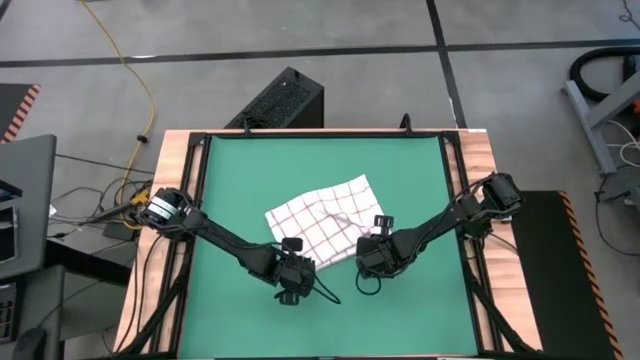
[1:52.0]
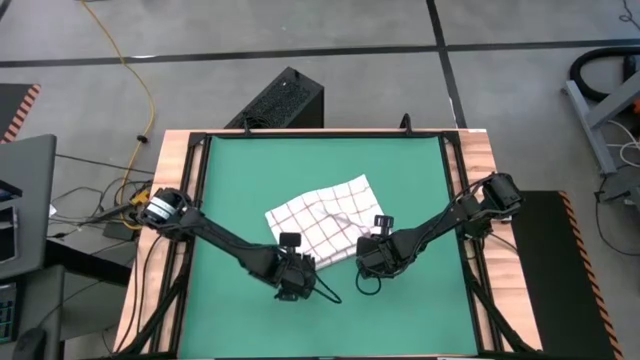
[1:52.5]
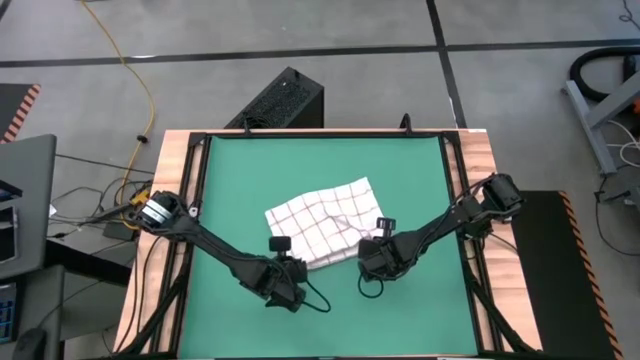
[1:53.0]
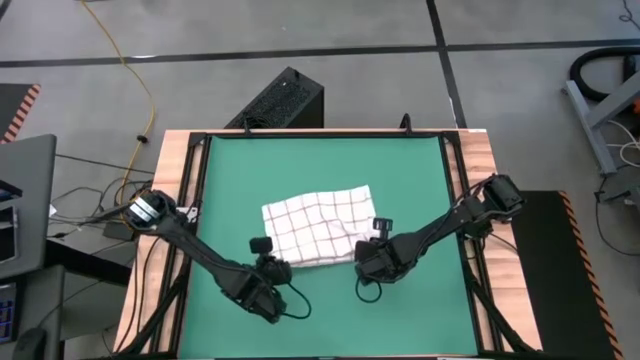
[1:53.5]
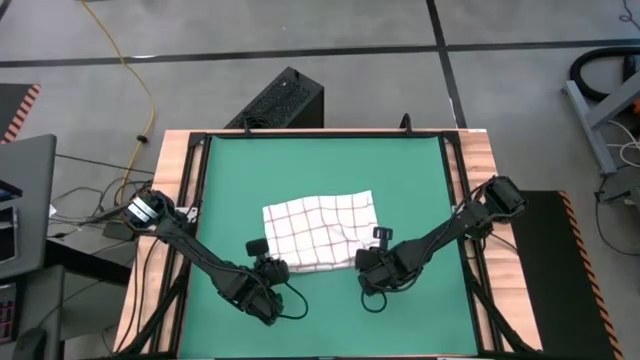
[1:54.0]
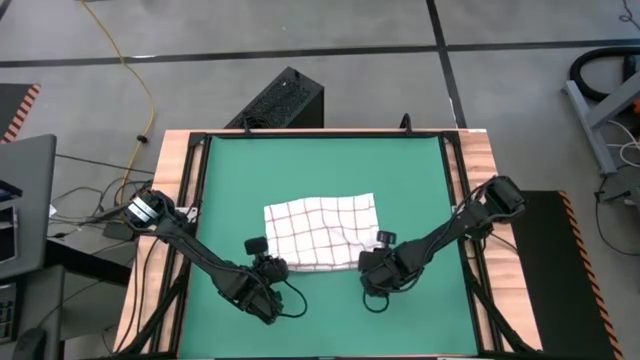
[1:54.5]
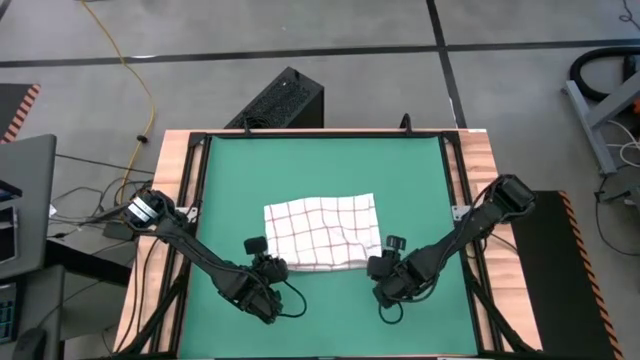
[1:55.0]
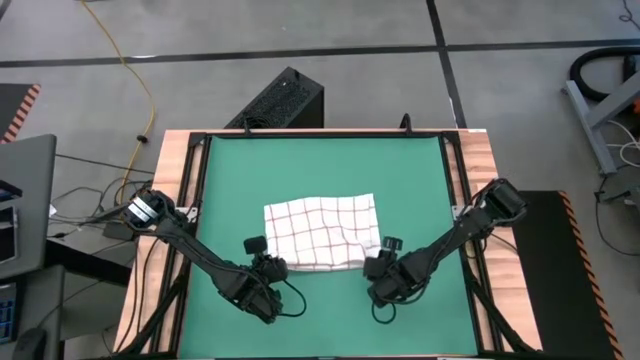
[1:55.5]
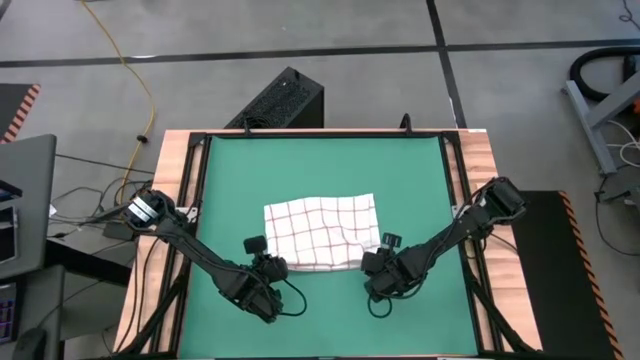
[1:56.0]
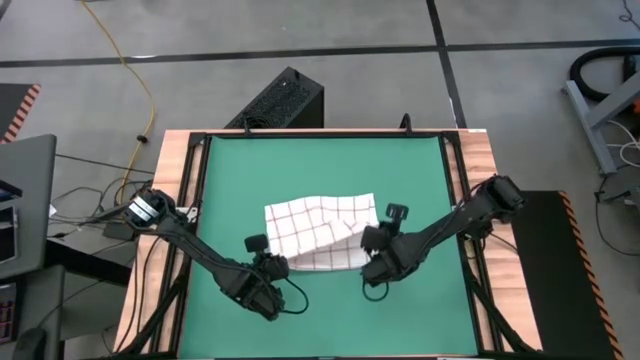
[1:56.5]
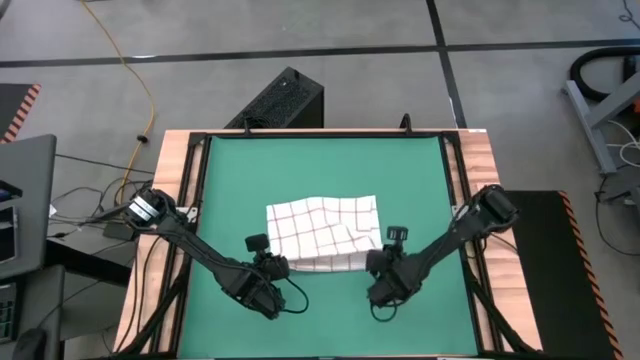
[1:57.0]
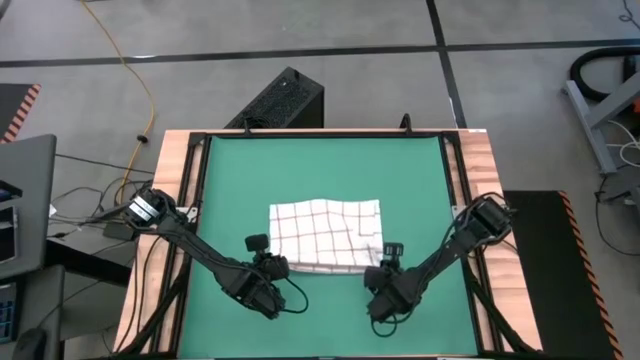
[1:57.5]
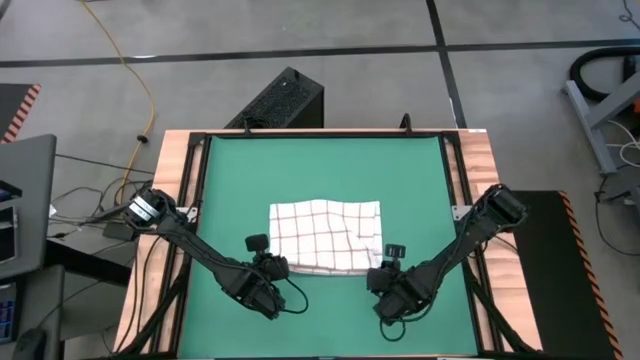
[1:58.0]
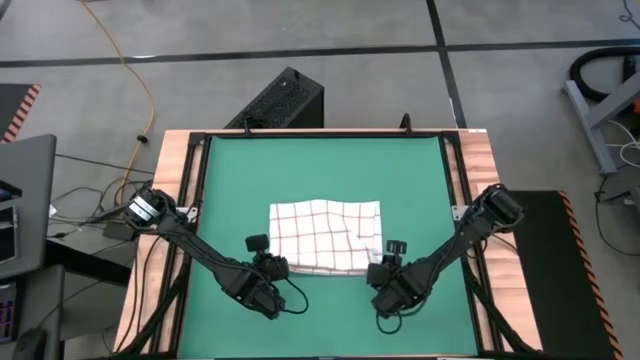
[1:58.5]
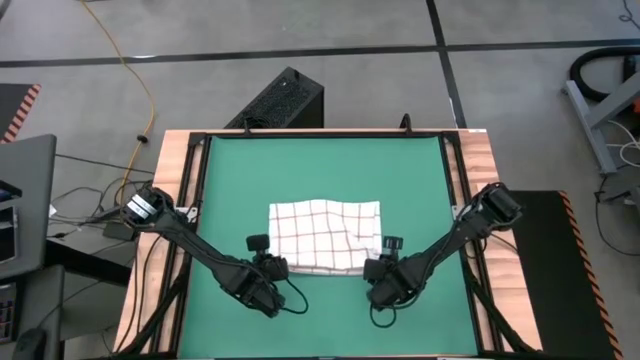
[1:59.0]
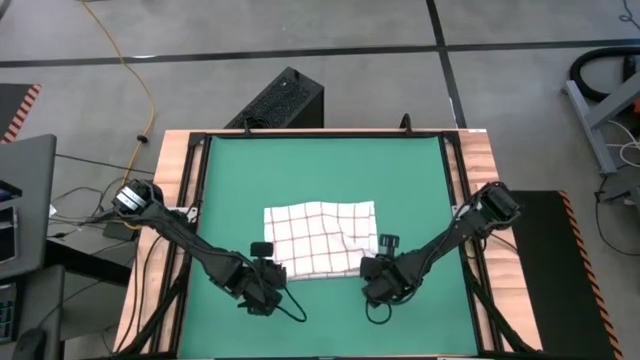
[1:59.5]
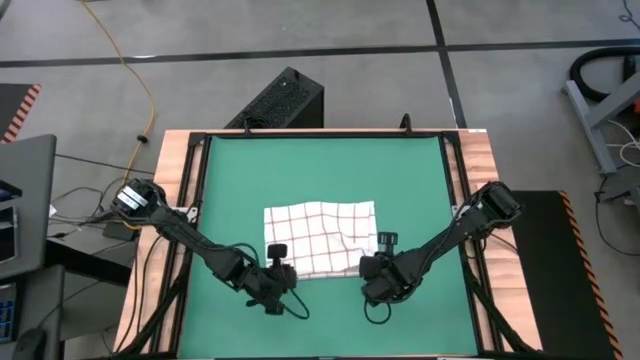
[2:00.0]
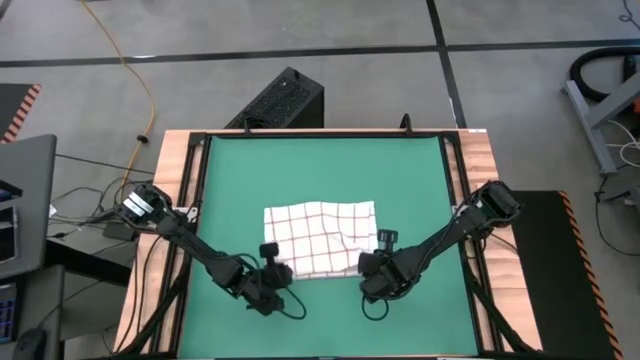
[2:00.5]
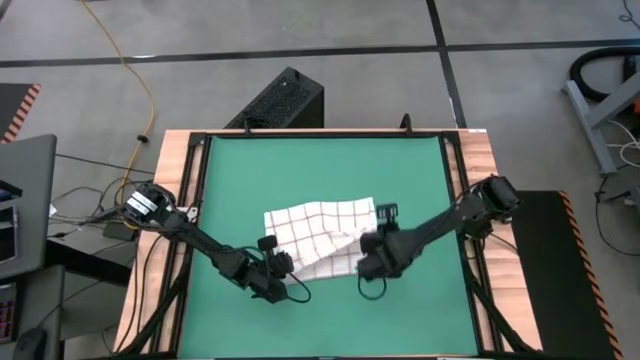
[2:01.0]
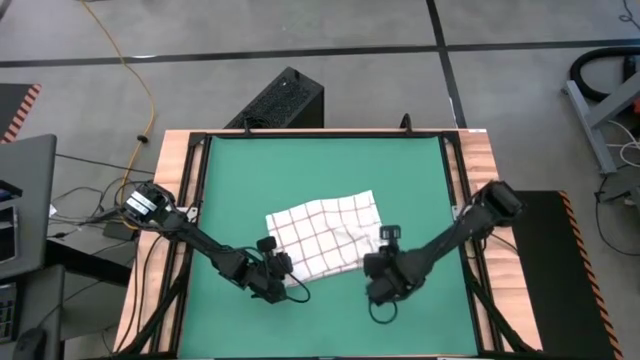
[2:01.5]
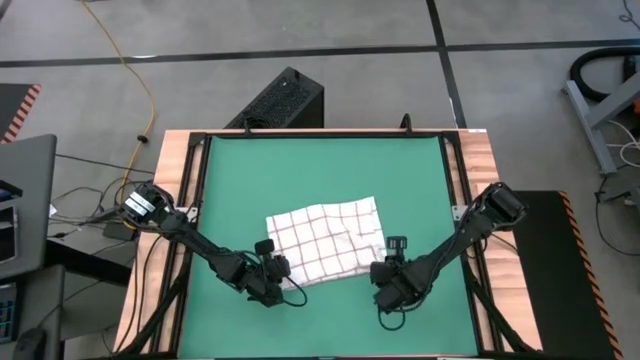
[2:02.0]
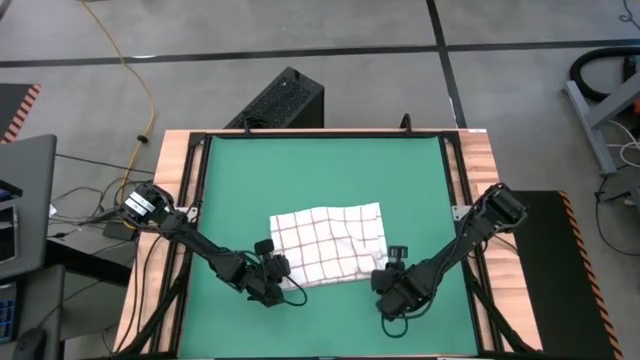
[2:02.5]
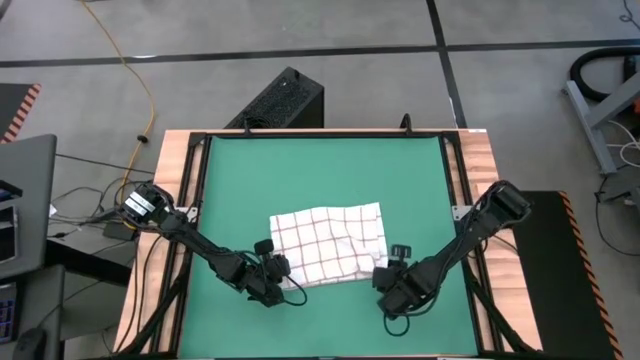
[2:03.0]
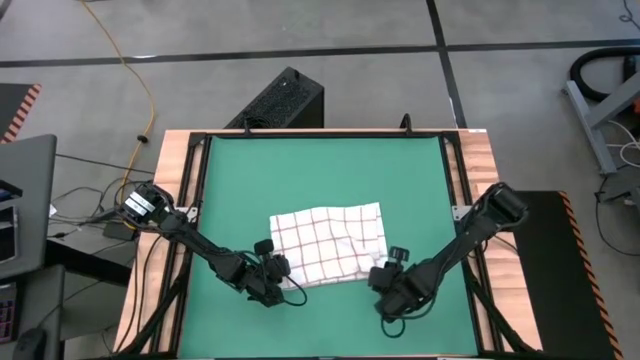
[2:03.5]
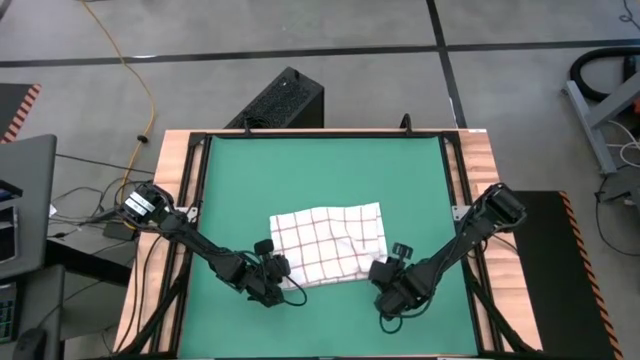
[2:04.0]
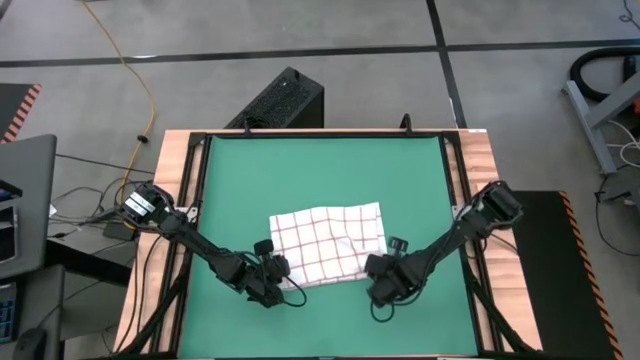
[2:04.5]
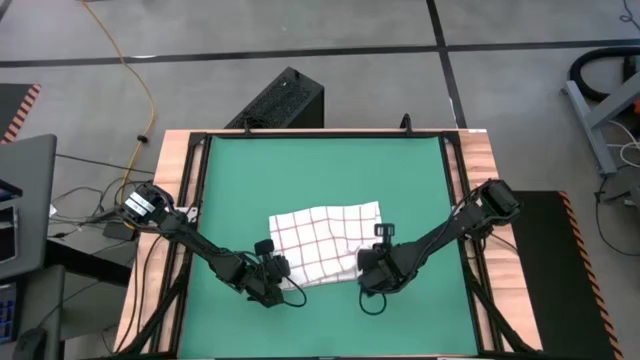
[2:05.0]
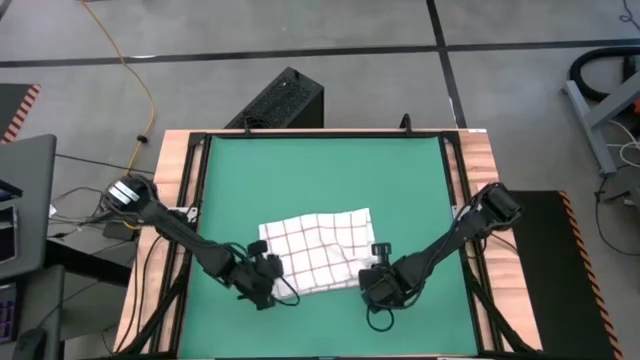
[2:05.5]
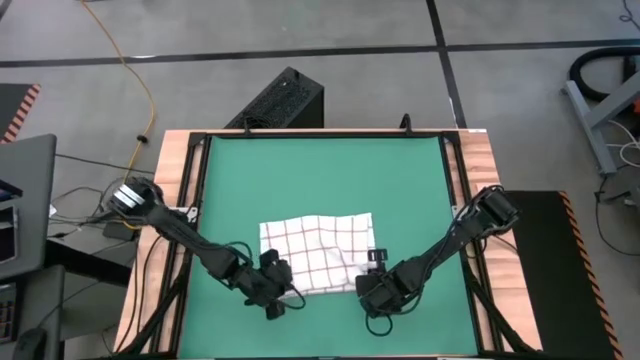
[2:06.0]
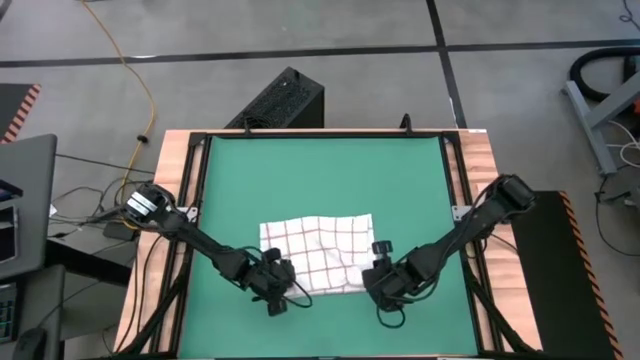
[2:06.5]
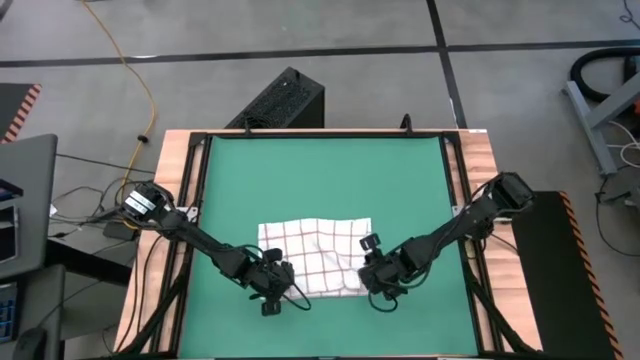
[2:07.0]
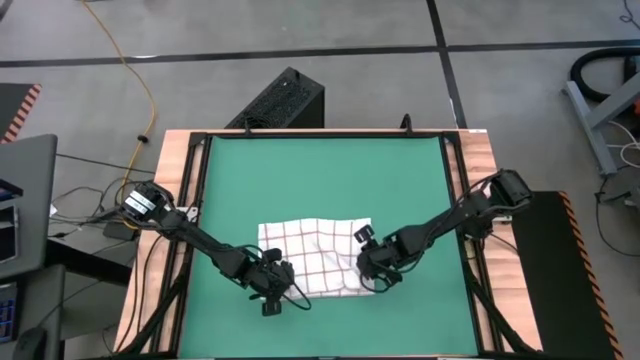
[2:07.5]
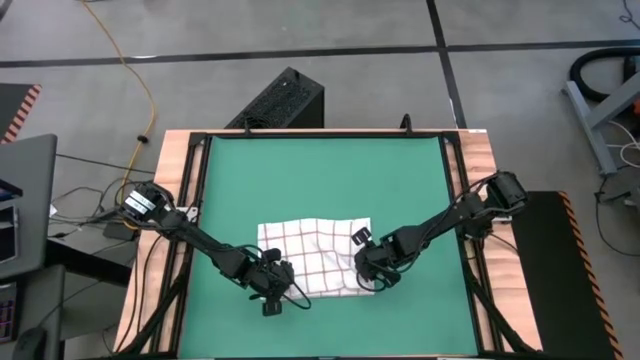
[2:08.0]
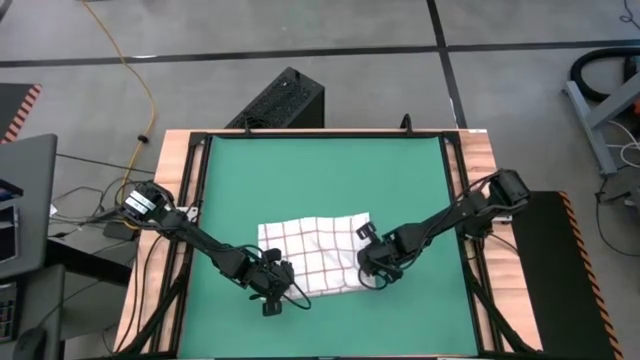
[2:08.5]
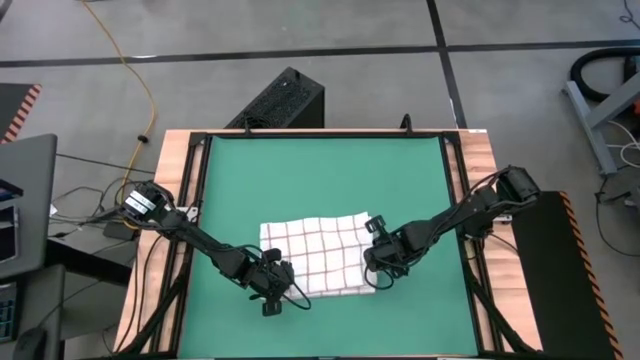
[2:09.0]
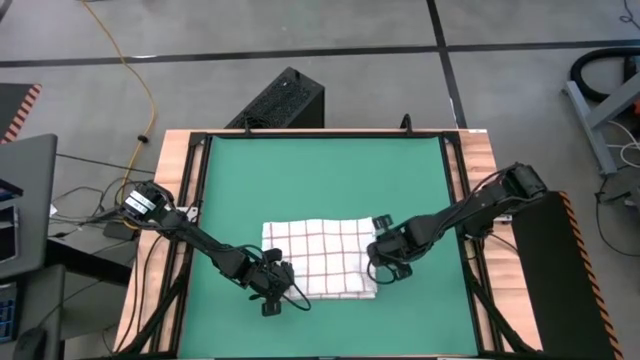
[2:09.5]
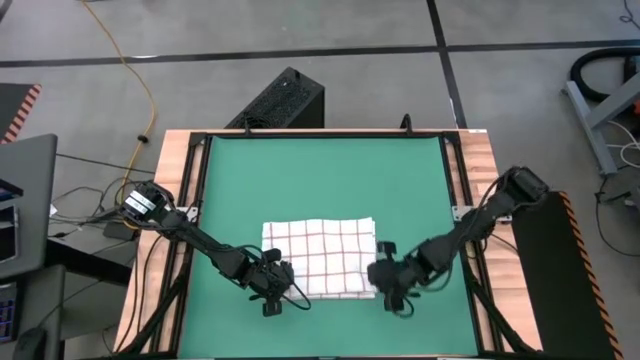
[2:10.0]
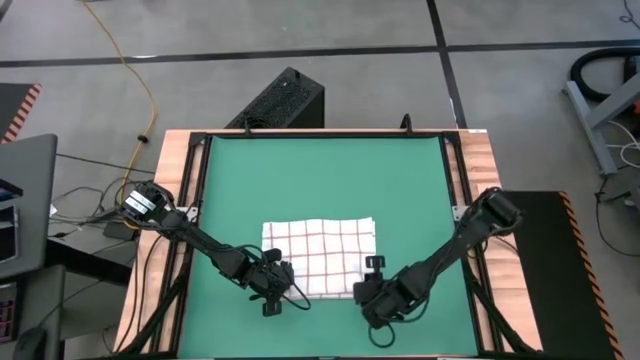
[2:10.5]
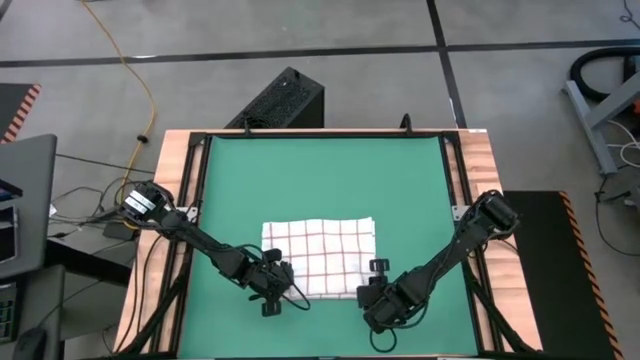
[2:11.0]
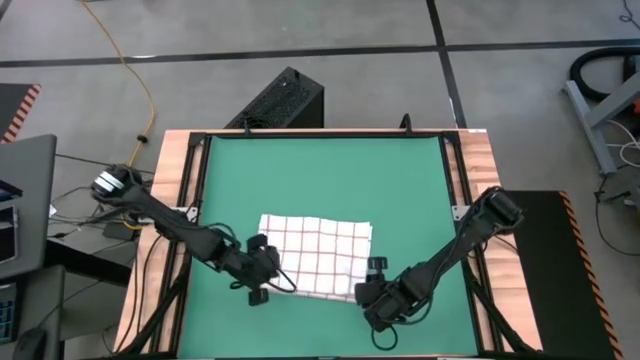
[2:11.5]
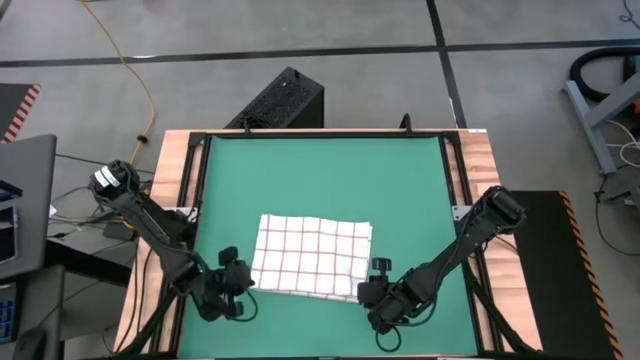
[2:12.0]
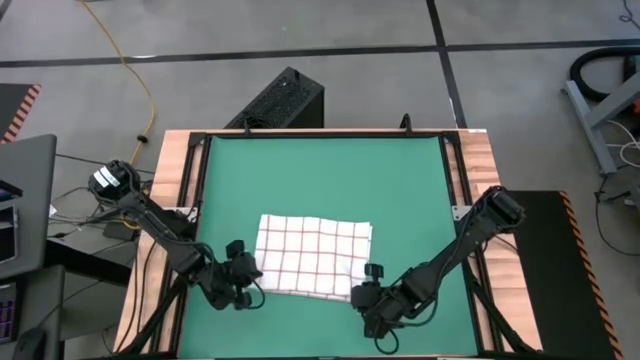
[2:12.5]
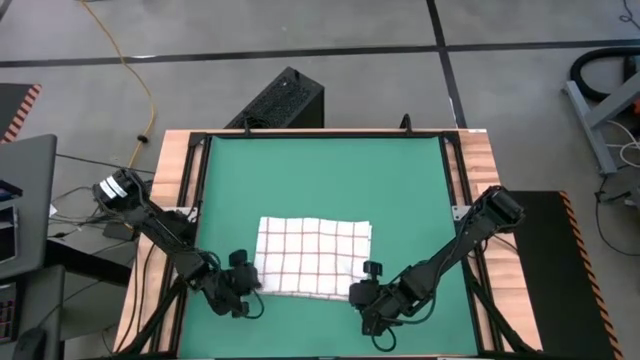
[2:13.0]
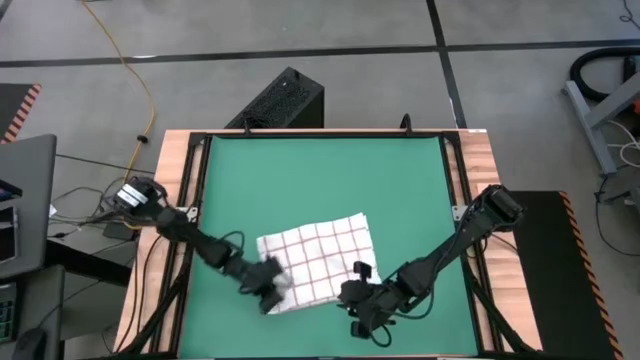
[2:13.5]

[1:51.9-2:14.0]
Task: Roll towel into tight, uniform cylinder
Roll the white patterned towel
